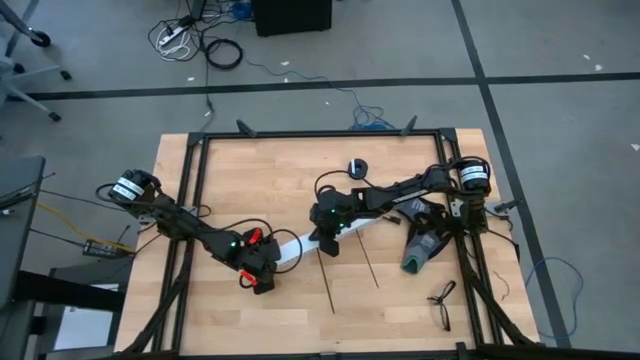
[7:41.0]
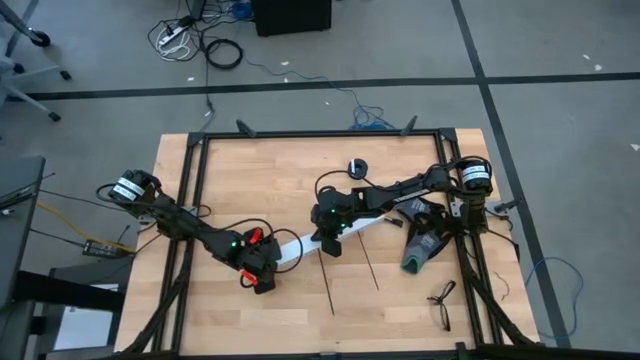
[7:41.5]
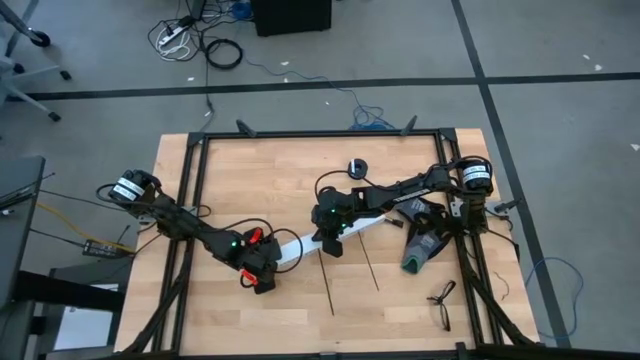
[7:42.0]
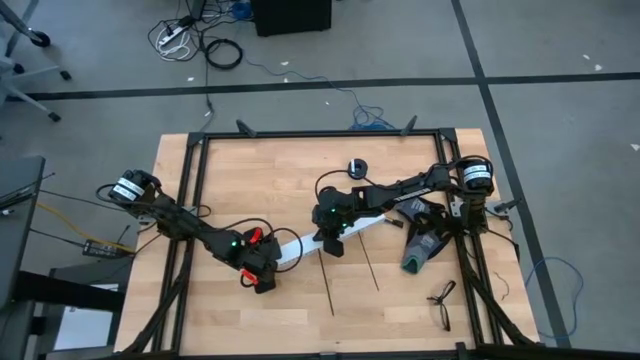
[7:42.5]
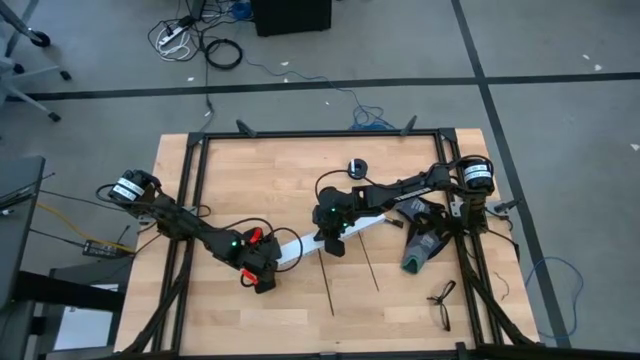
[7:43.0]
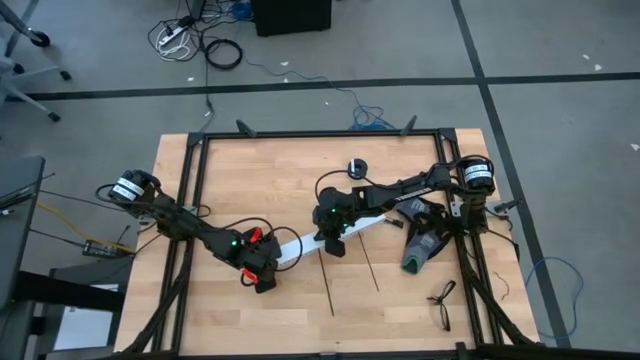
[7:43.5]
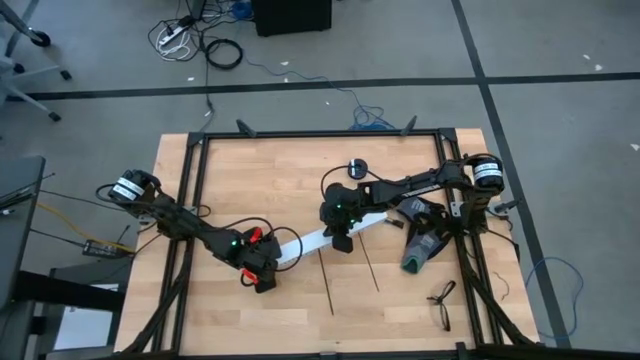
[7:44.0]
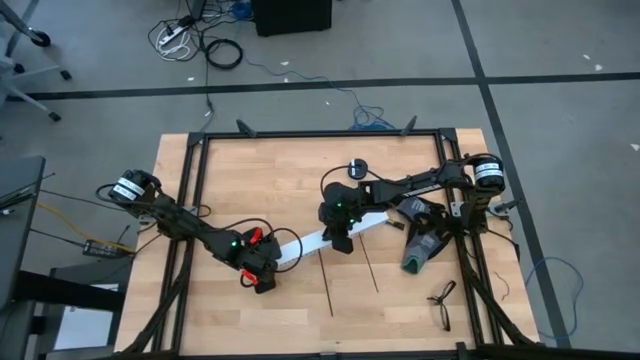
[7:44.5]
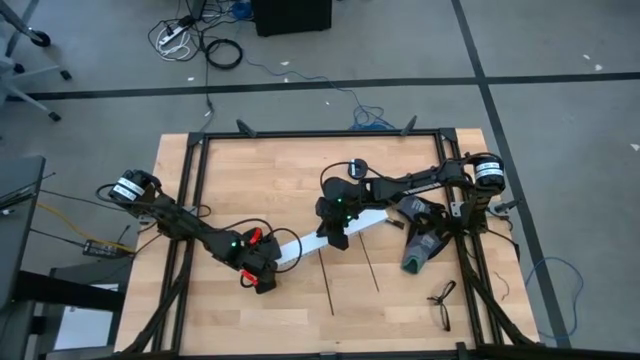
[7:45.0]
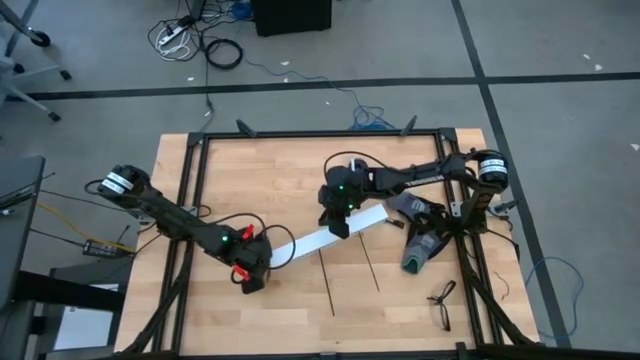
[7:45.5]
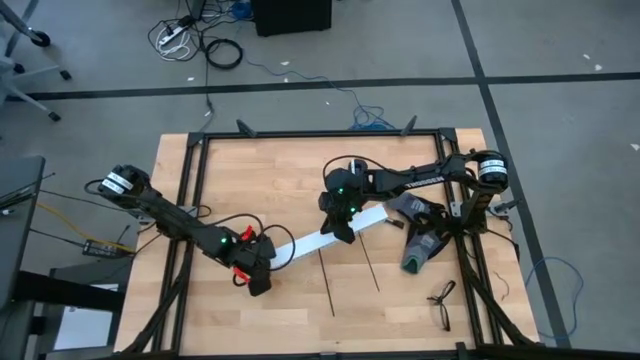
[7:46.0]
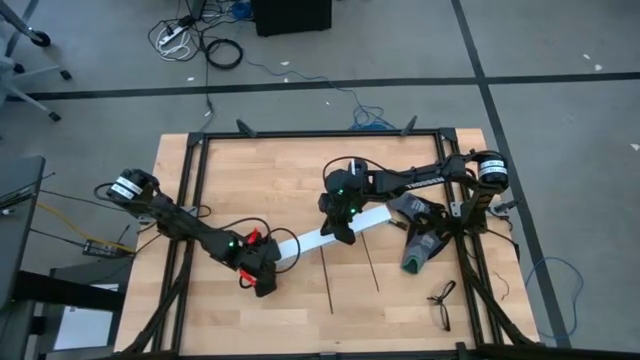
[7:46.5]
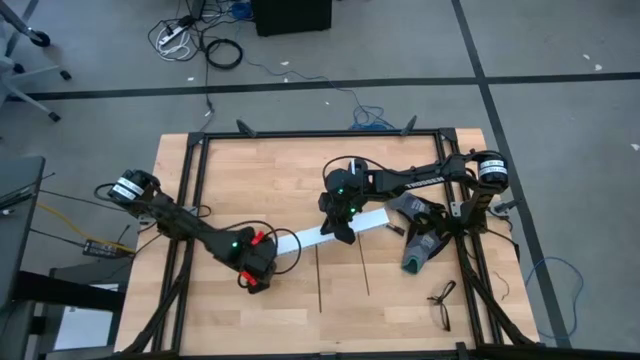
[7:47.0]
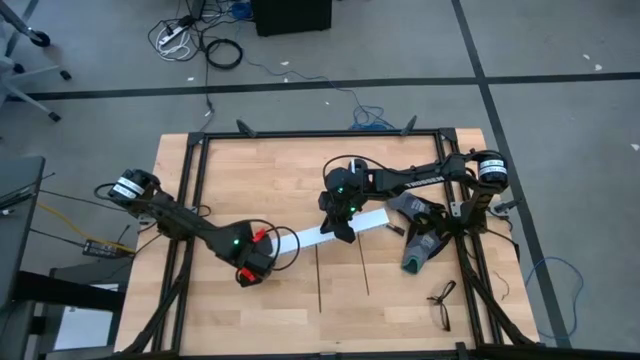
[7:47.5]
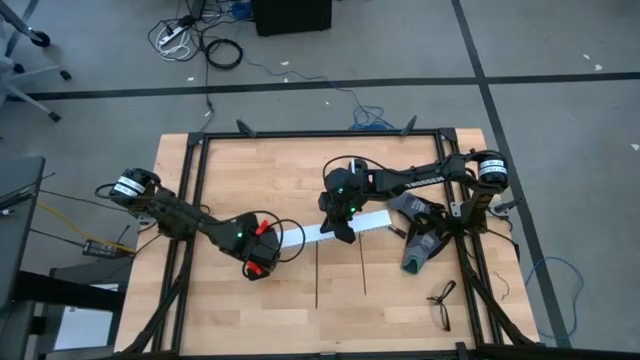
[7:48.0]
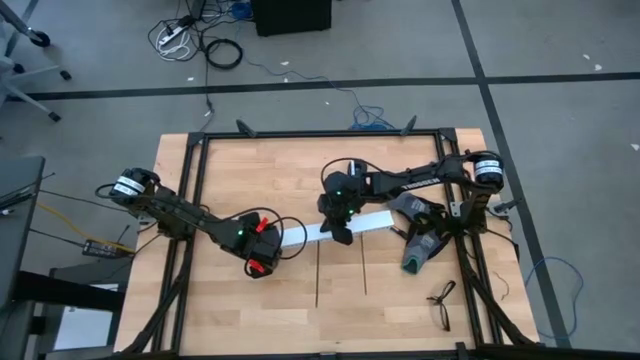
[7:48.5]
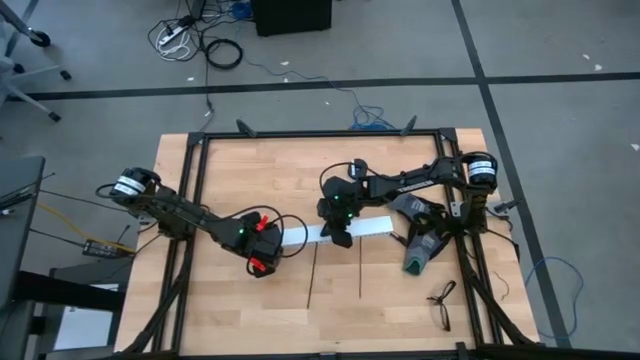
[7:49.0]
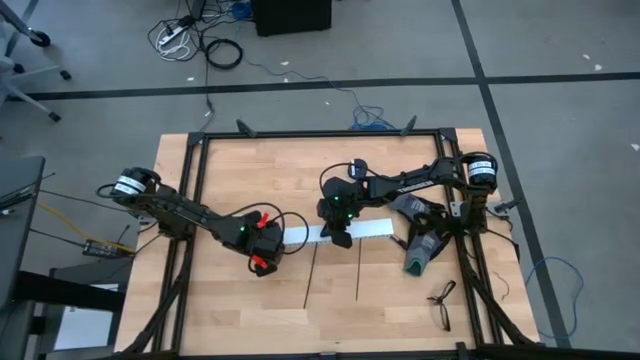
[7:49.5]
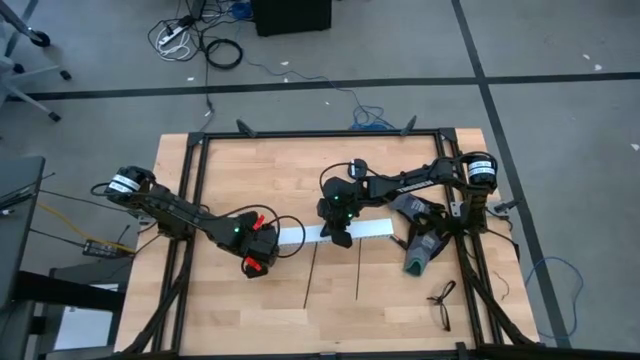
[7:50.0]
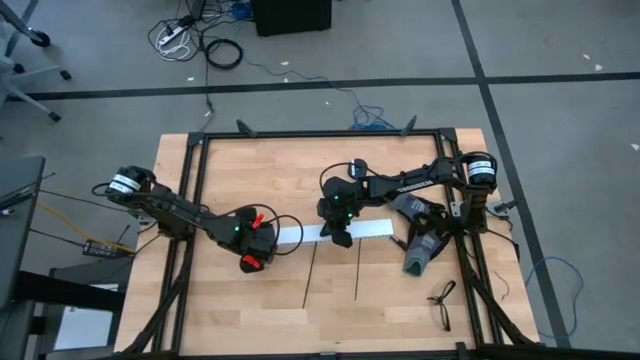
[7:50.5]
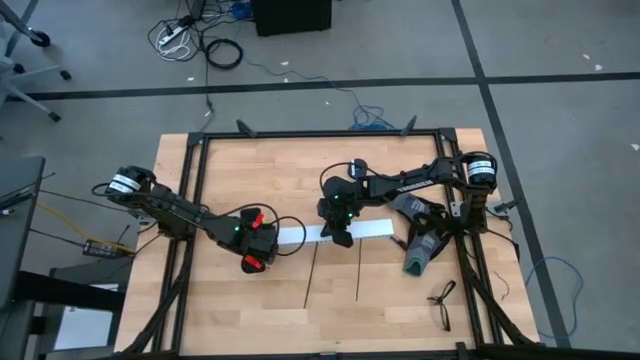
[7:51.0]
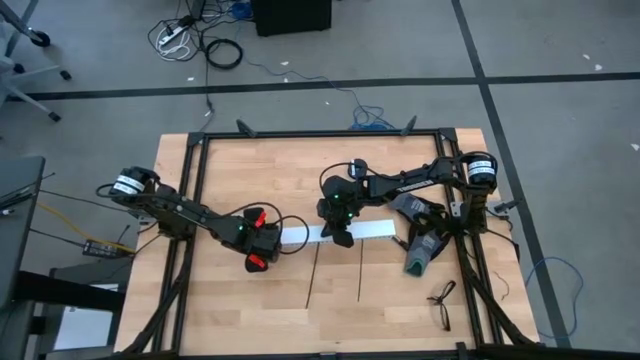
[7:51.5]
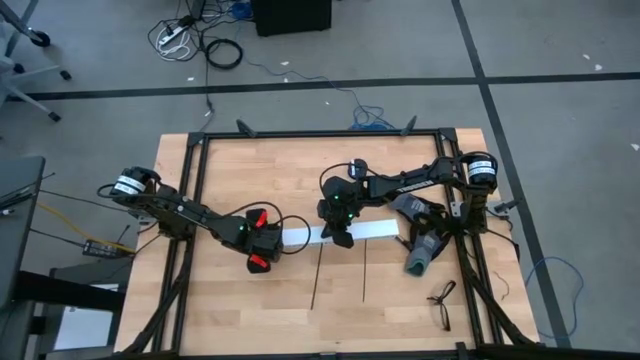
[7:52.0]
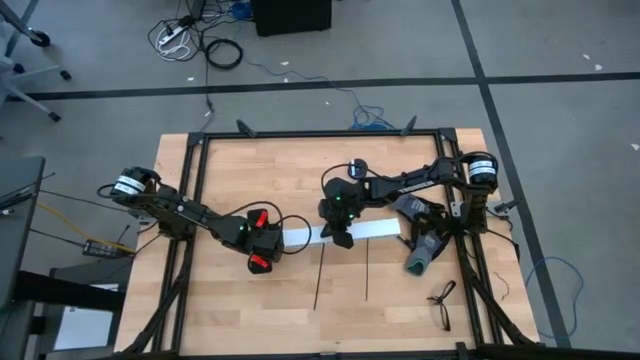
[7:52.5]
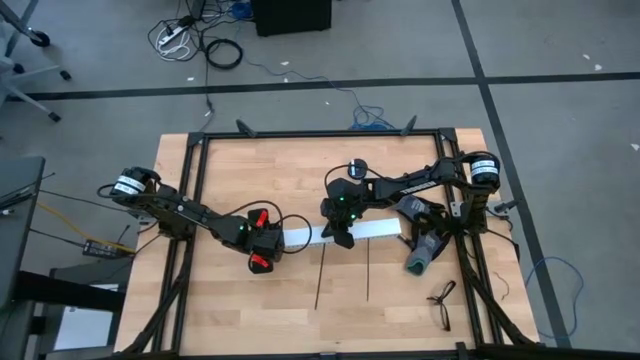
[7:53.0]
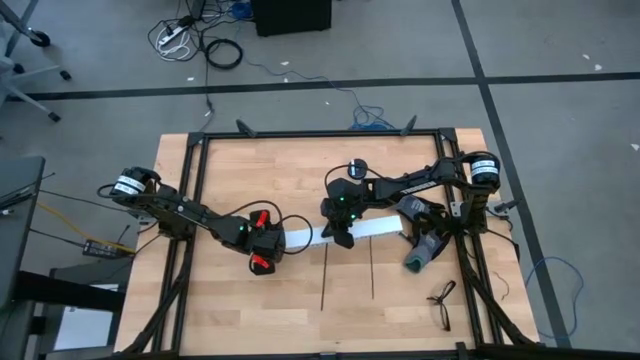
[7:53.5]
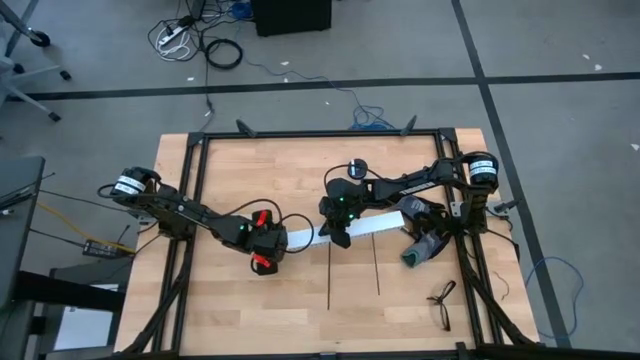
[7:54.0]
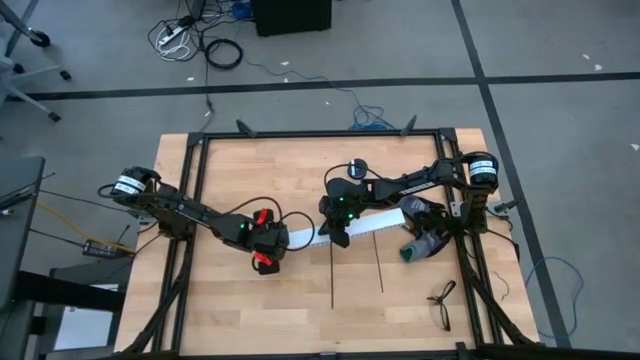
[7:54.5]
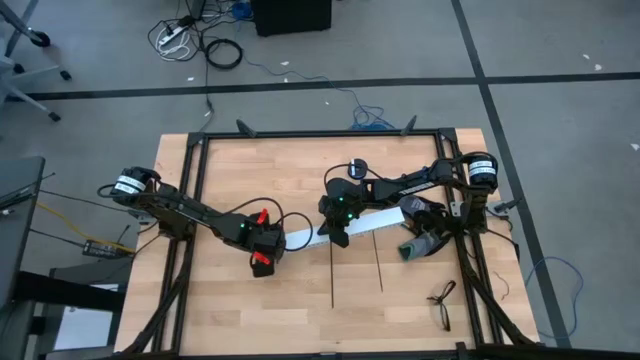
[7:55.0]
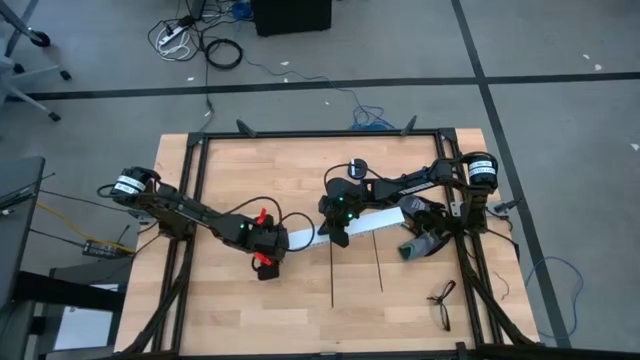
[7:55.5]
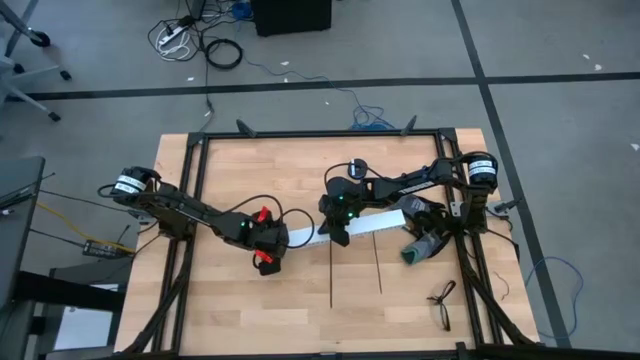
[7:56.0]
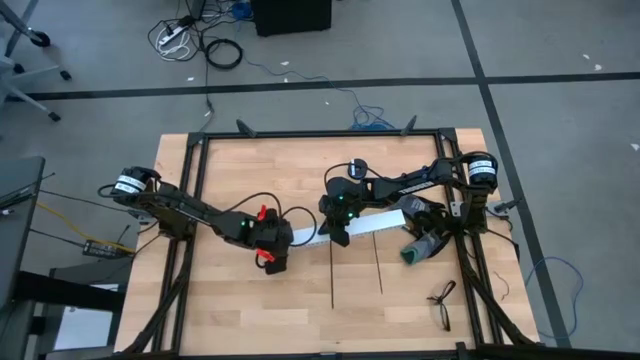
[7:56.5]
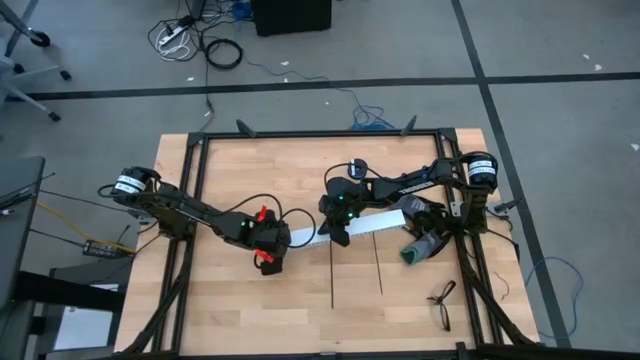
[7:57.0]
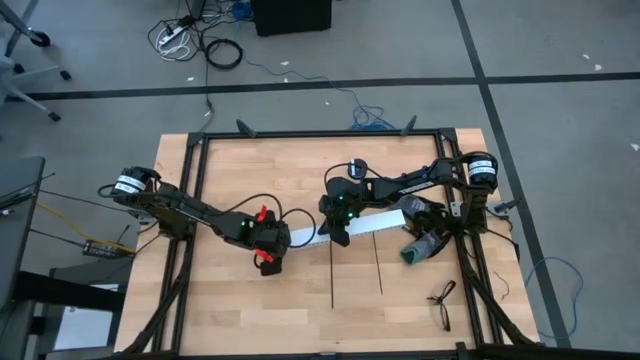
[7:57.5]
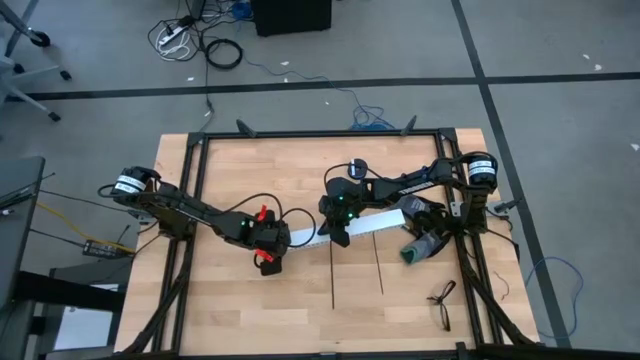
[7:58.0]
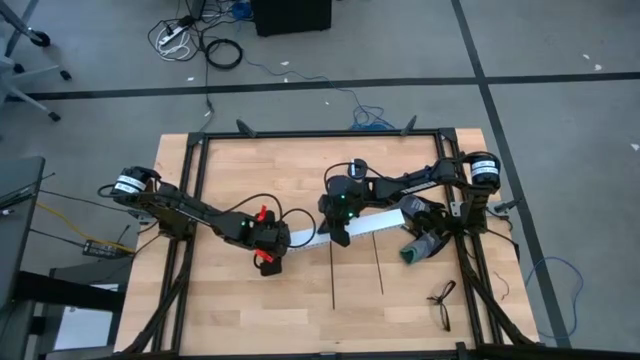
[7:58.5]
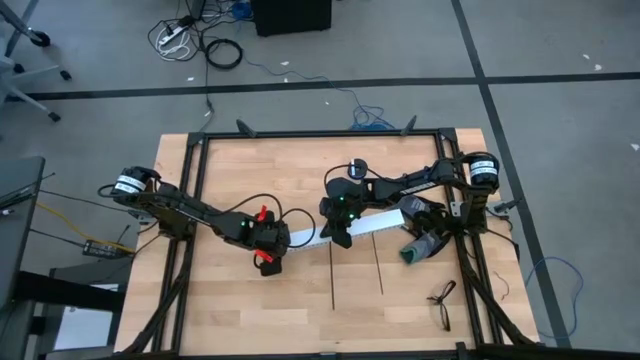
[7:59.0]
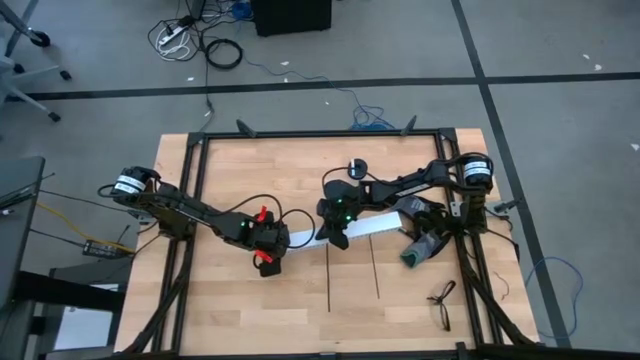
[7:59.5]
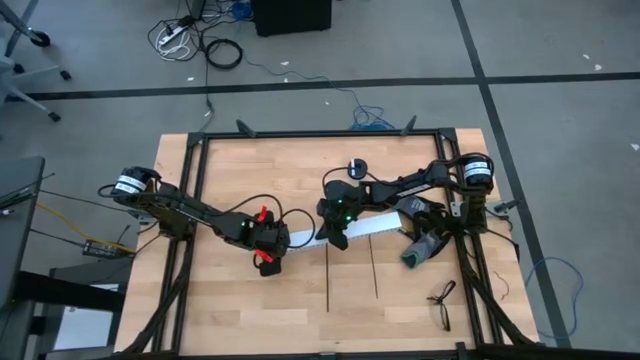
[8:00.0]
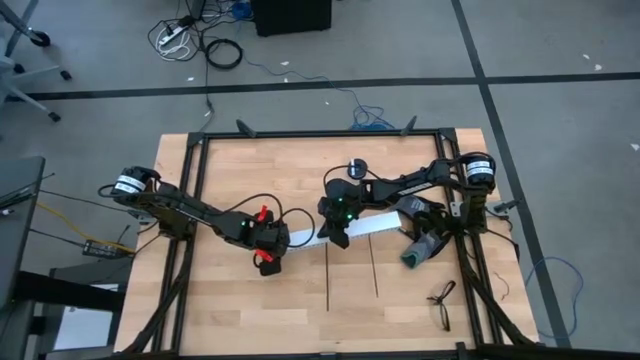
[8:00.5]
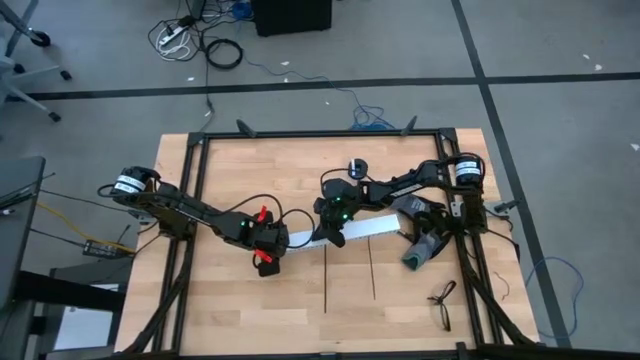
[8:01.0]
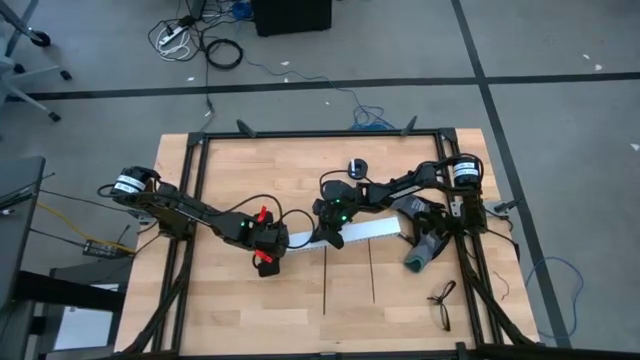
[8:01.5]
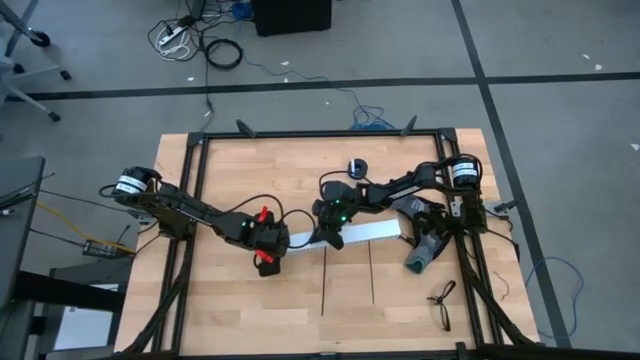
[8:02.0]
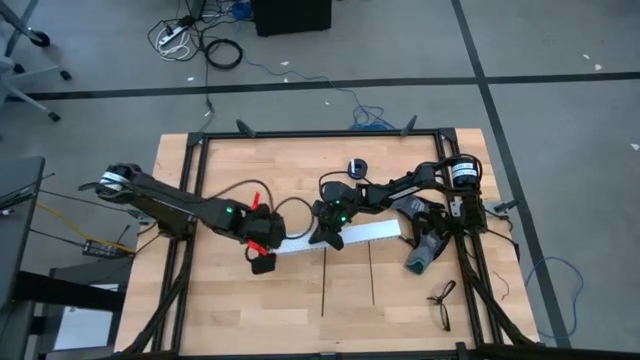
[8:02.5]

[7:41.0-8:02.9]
Task: Ziptie cables
Close the white cable duct
